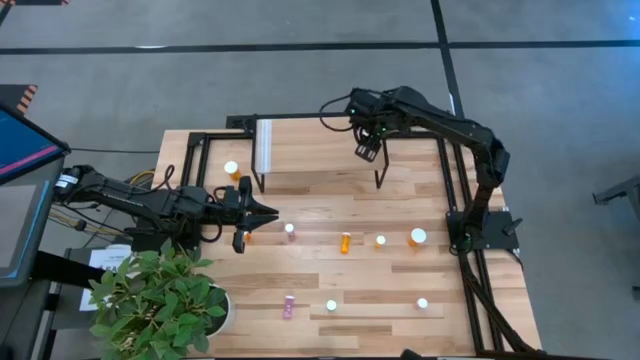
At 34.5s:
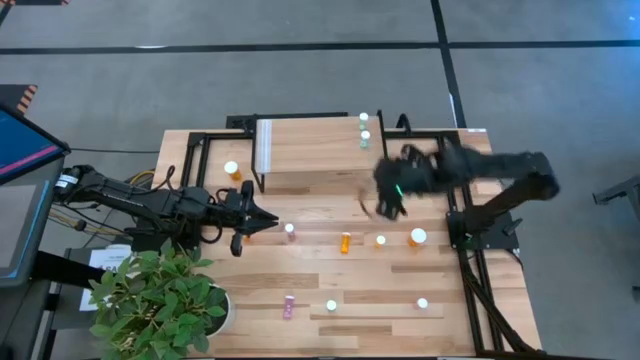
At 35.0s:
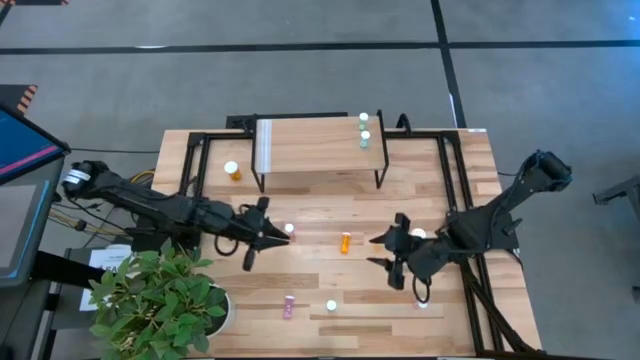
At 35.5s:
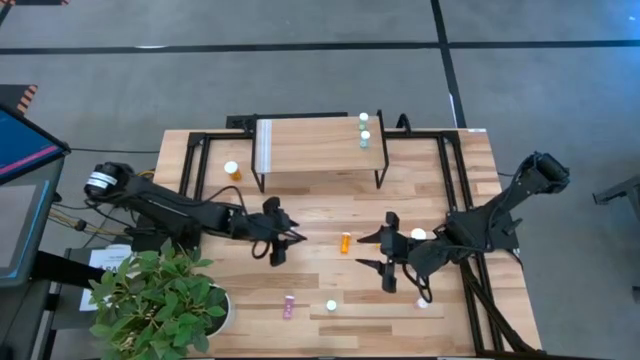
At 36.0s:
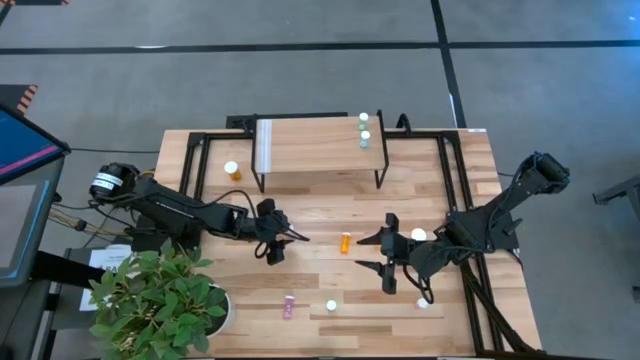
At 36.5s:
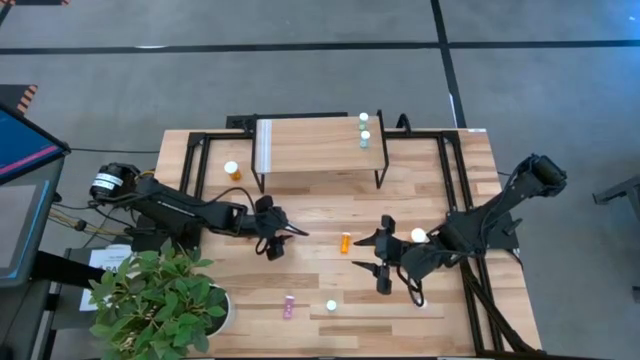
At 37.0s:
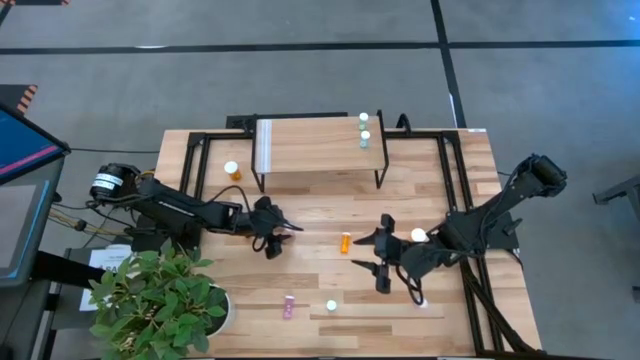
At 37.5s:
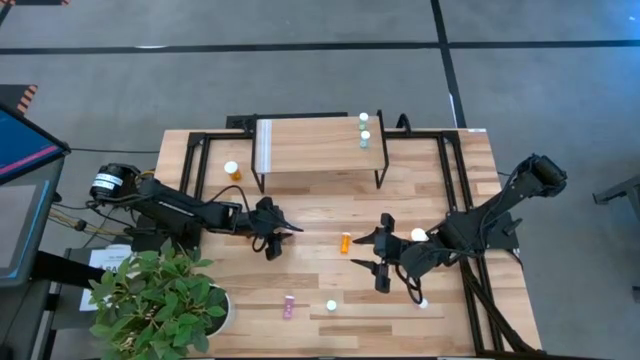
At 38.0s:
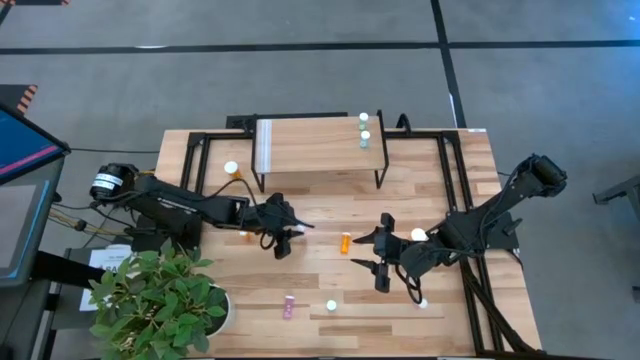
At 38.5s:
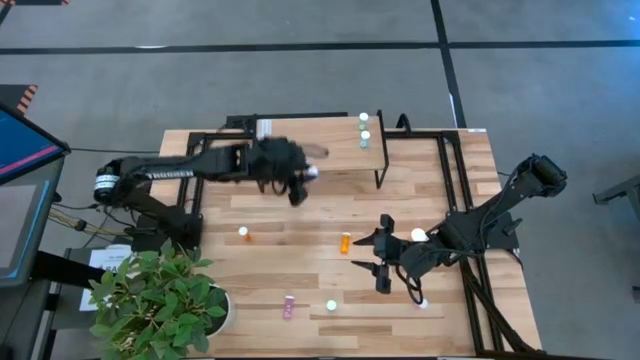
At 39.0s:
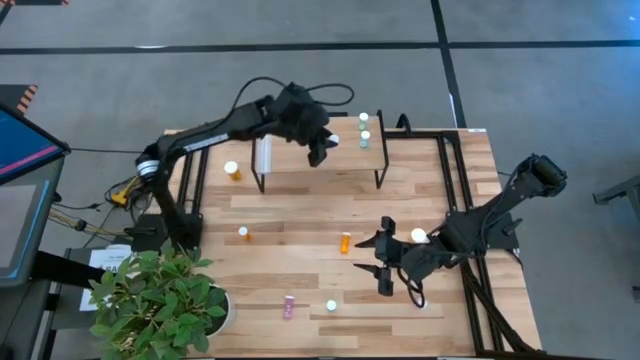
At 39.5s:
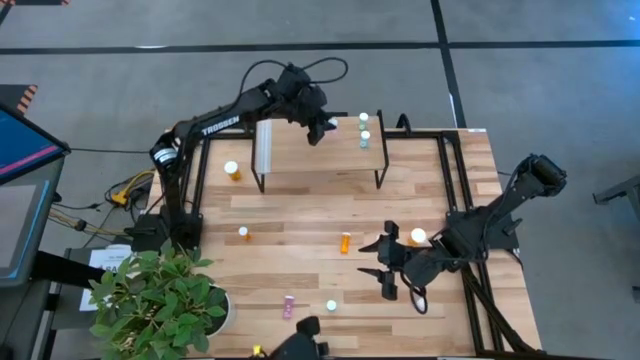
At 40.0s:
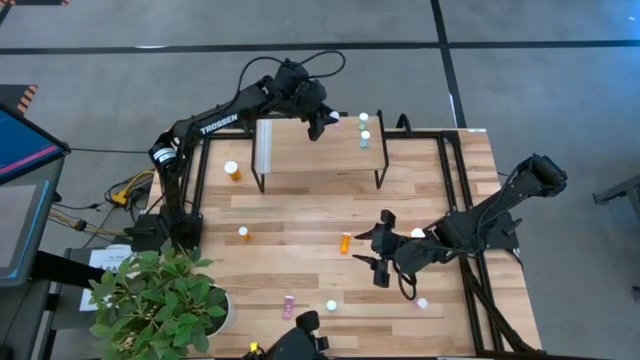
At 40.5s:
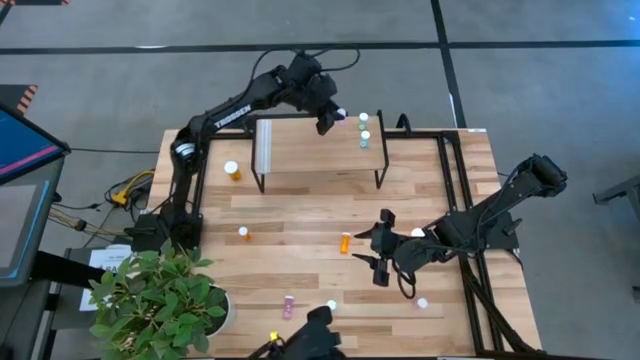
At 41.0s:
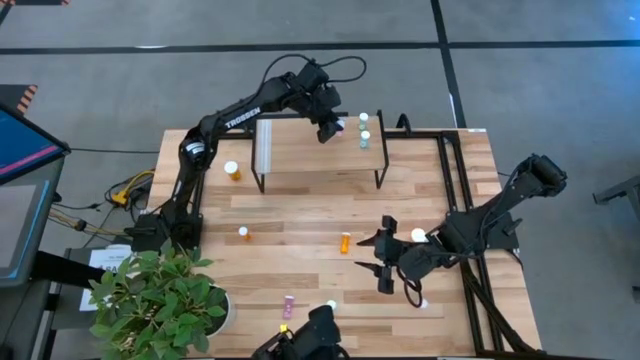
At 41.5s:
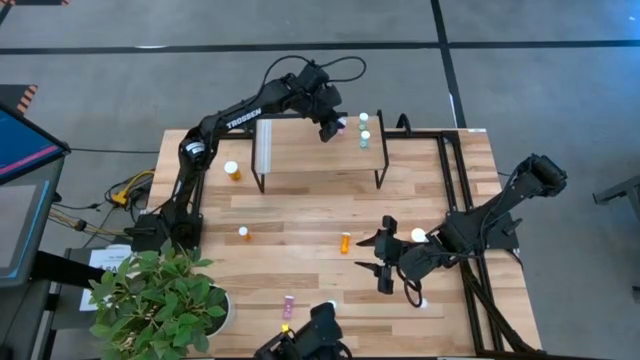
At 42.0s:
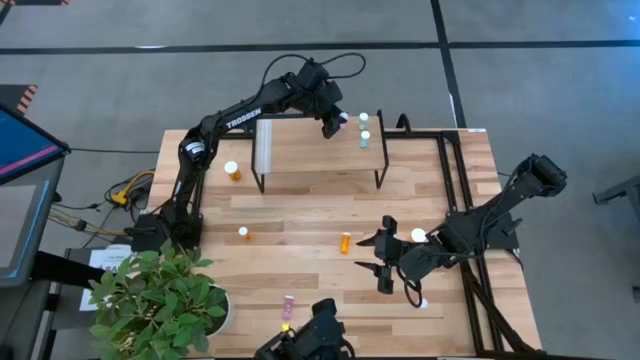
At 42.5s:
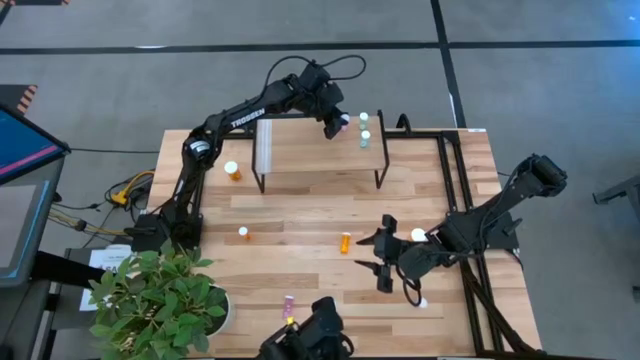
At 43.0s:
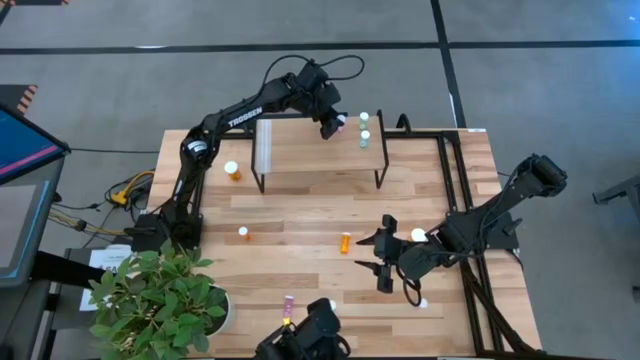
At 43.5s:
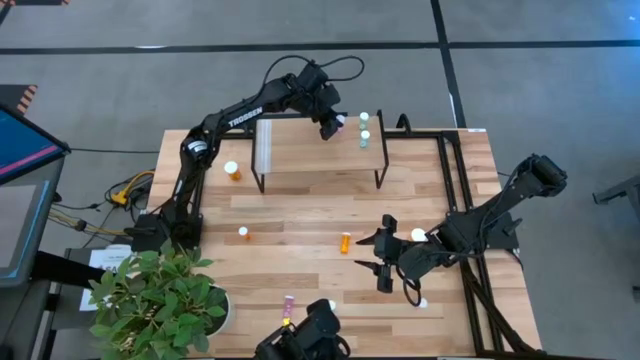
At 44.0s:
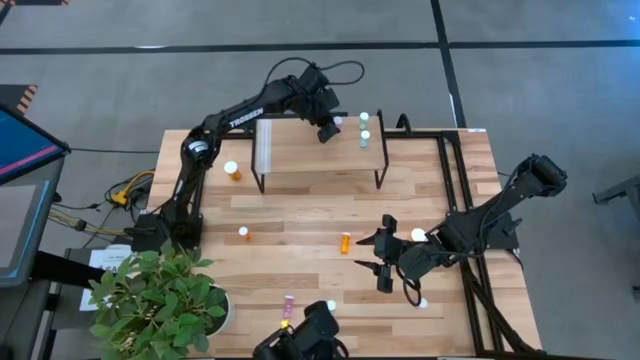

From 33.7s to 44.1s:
Task: Pick and place medicine bottles onto shelf by color
Put the top small pink pill bottle on the shelf

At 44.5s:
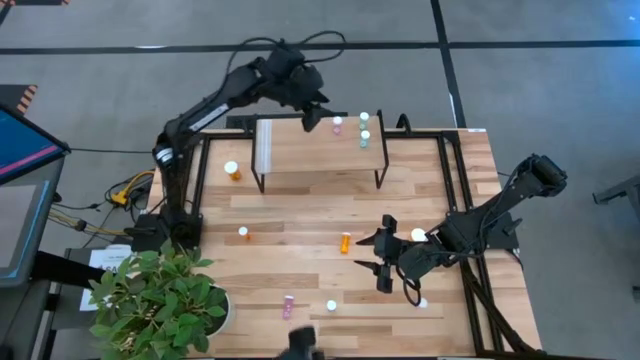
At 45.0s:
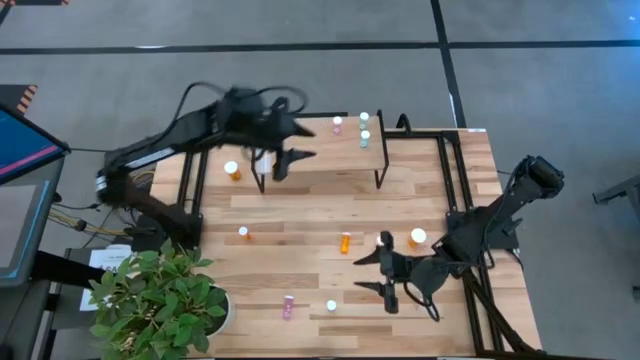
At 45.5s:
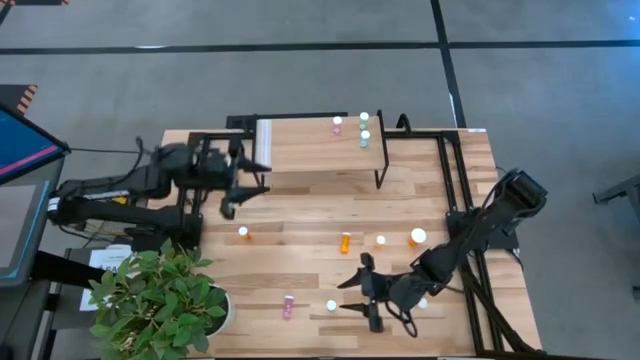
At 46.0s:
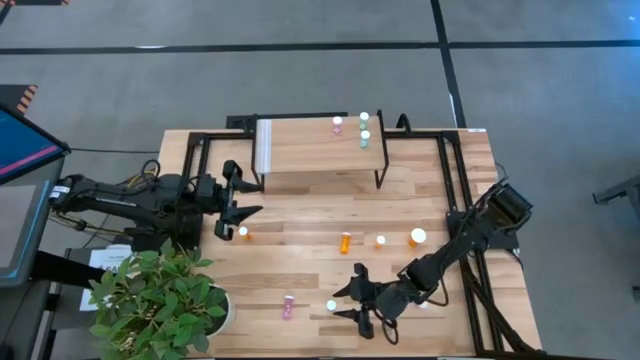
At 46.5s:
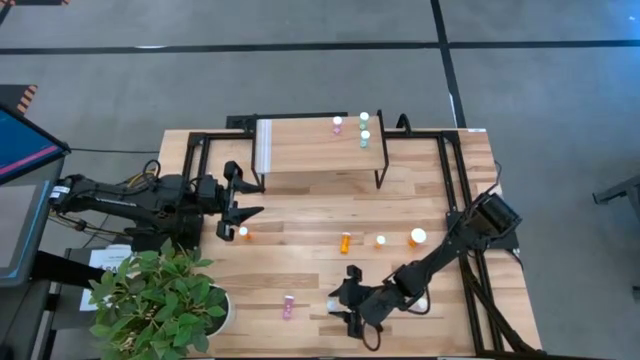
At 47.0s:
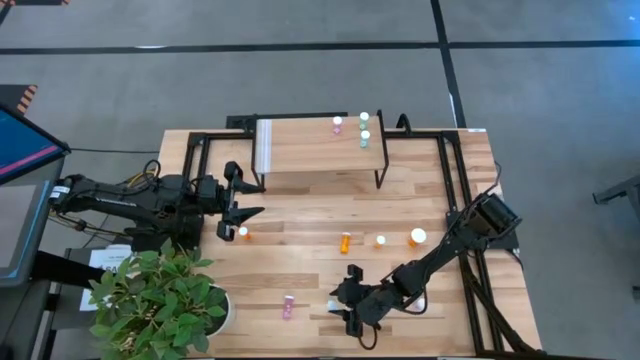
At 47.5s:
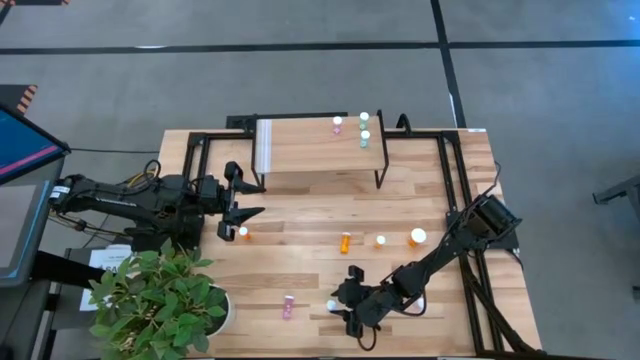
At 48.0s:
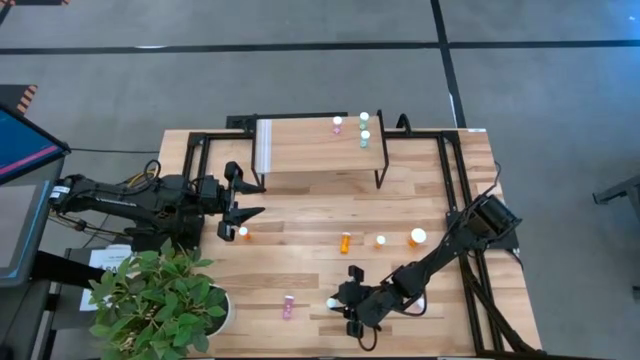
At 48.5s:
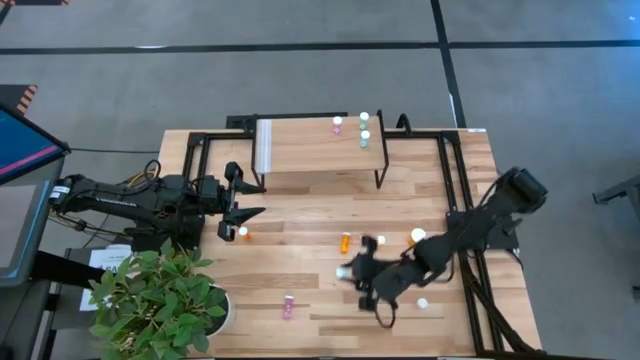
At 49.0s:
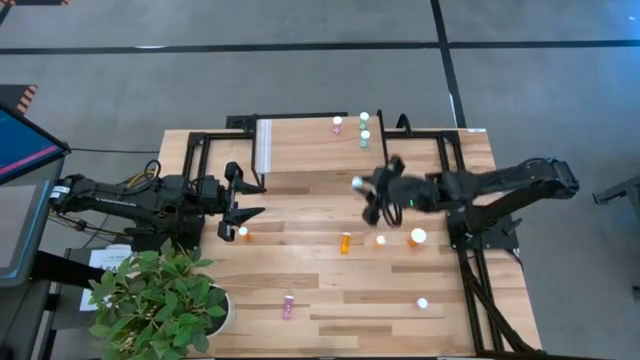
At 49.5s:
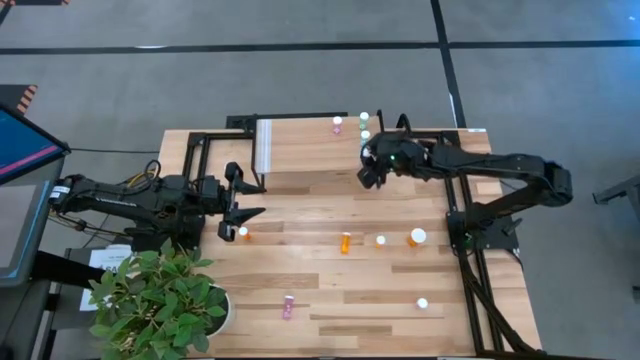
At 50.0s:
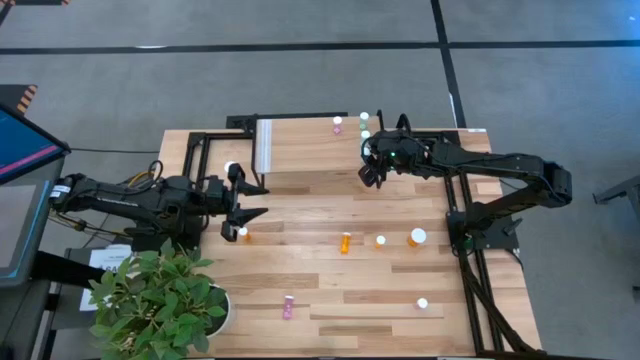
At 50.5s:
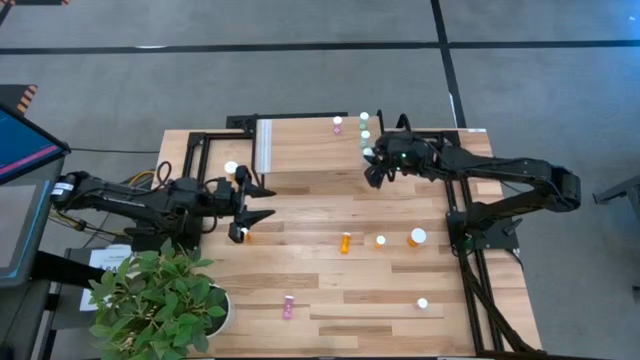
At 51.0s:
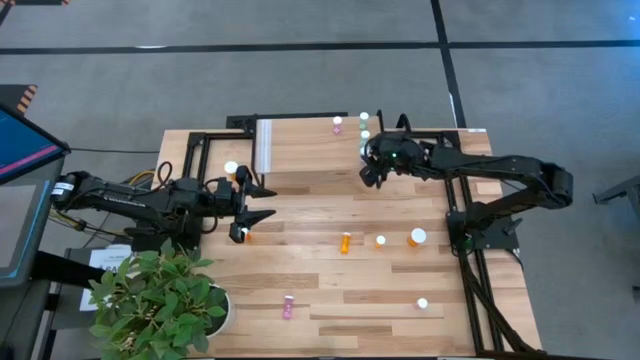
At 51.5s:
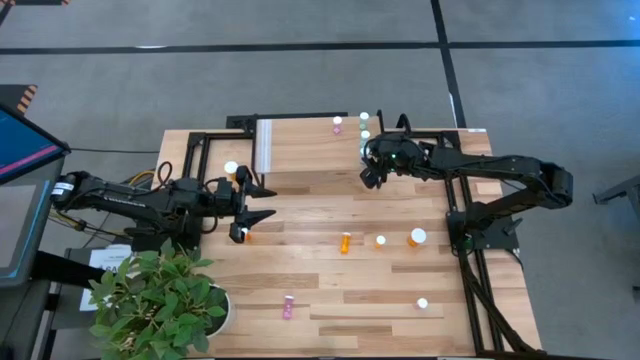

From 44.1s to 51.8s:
Align the small green pill bottle with the other small green pill bottles on the shelf

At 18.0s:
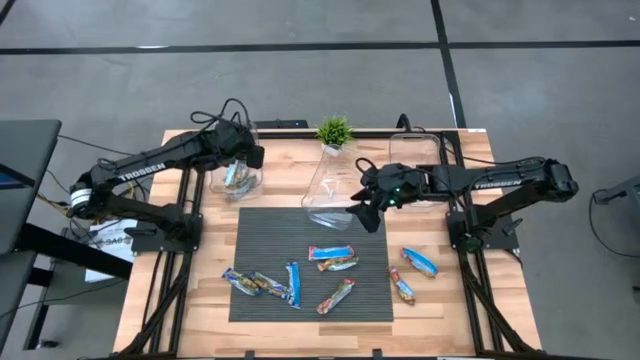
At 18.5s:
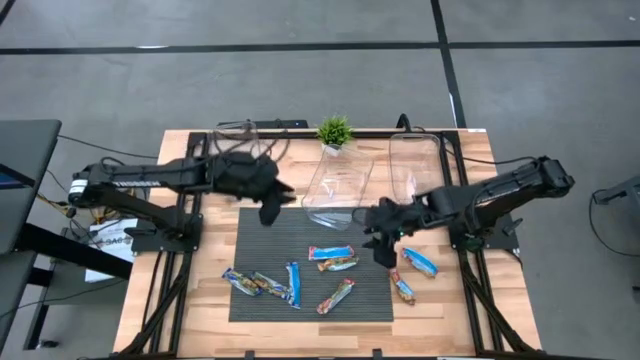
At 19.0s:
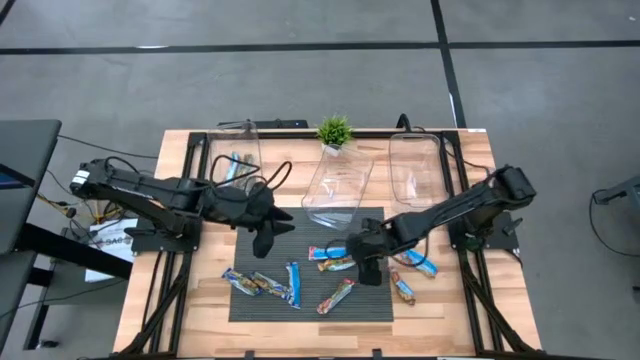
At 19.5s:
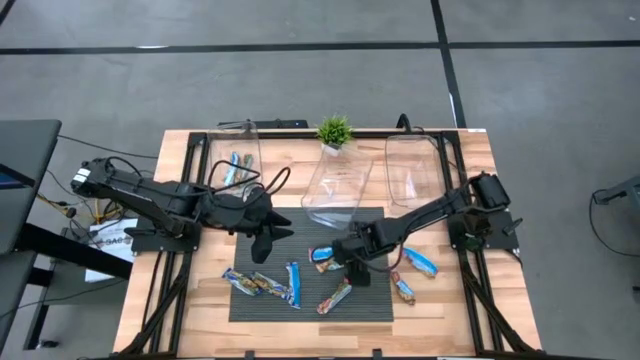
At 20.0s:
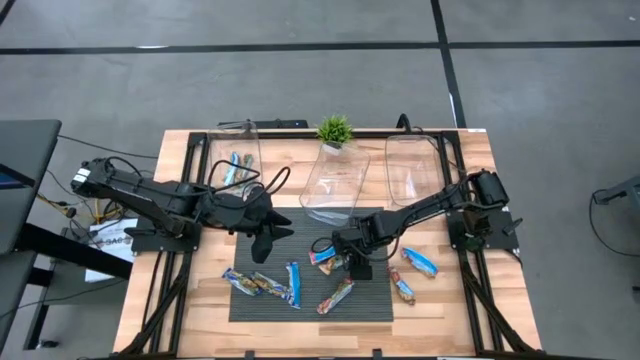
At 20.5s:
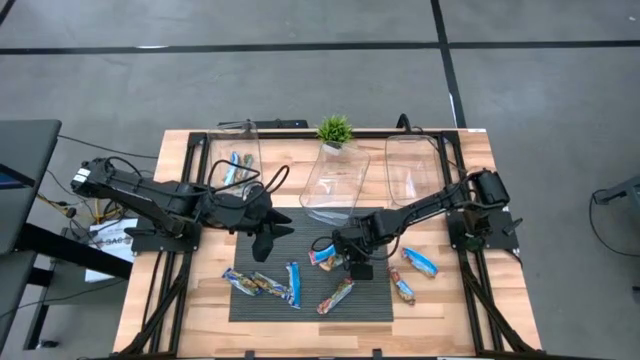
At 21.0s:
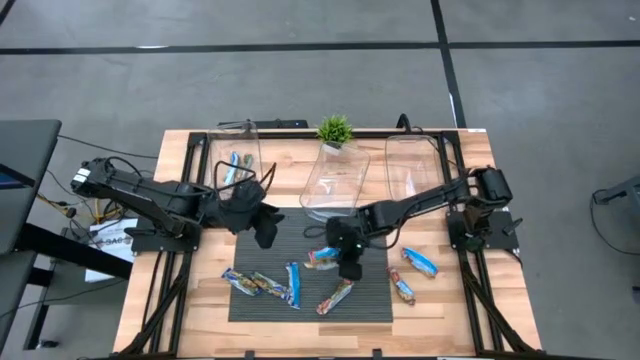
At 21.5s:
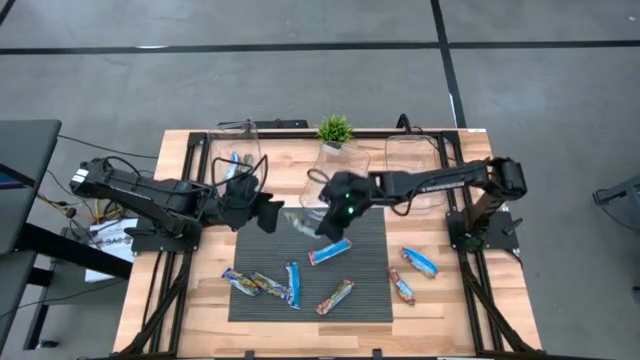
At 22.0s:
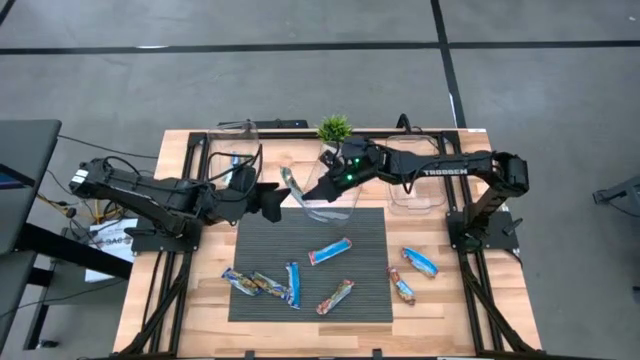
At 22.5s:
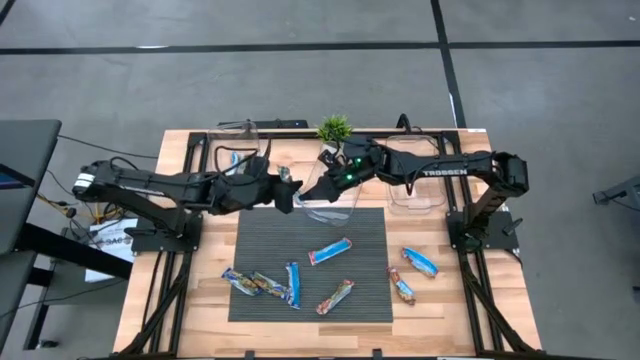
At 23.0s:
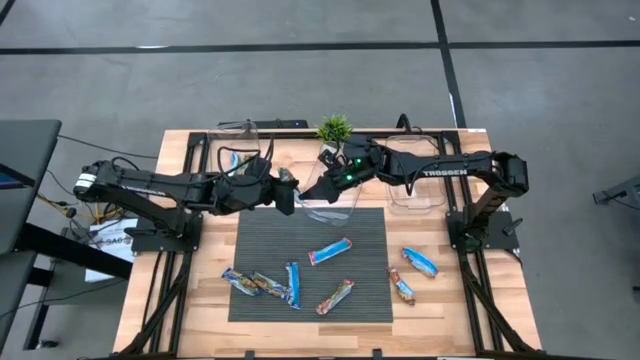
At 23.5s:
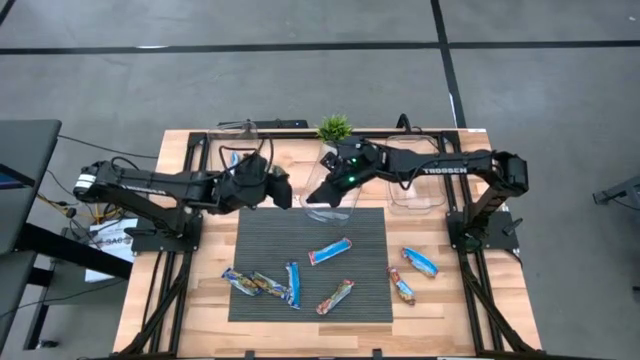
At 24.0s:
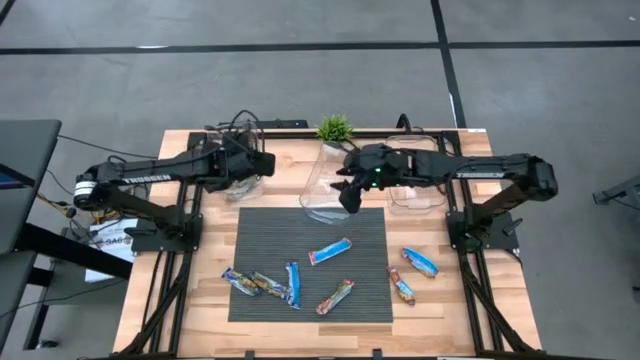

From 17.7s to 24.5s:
Task: Pick and place Granola Bars by type
Put the yellow granola bar into the left transparent bin
